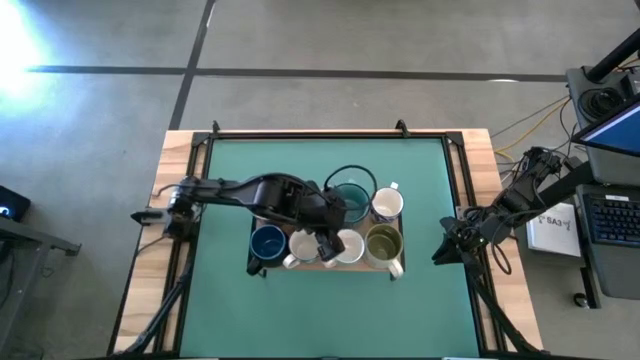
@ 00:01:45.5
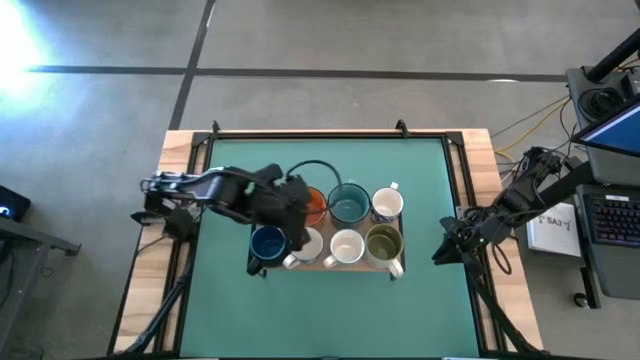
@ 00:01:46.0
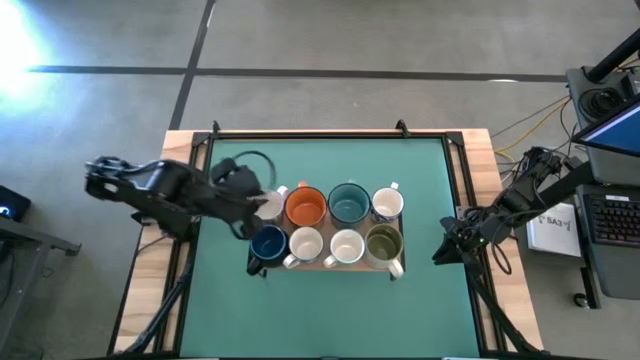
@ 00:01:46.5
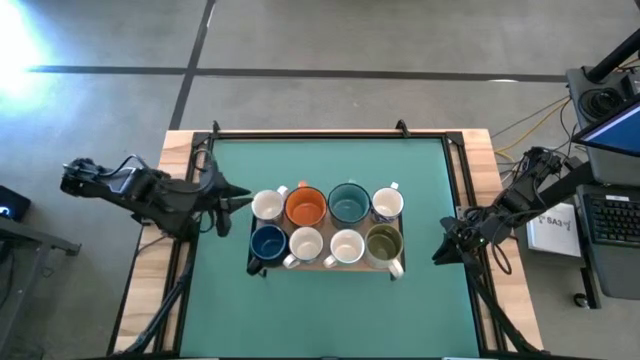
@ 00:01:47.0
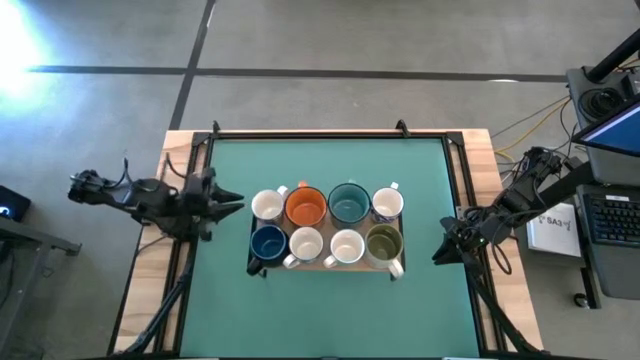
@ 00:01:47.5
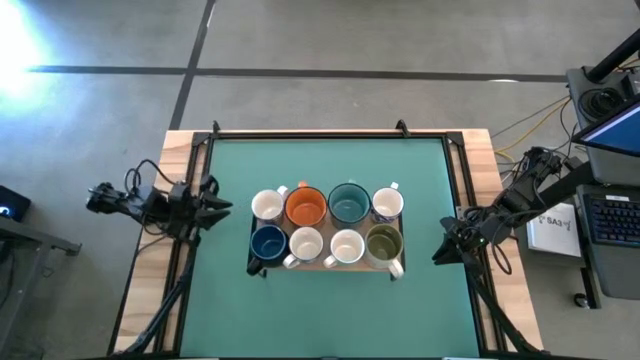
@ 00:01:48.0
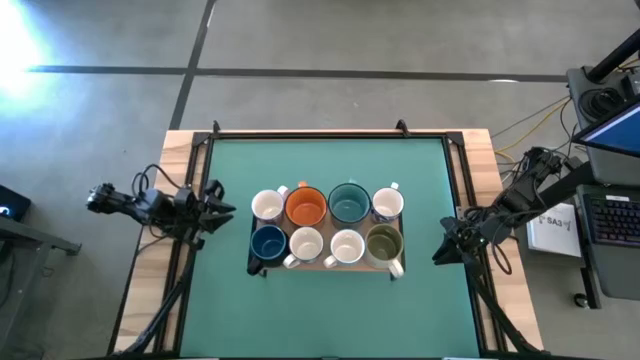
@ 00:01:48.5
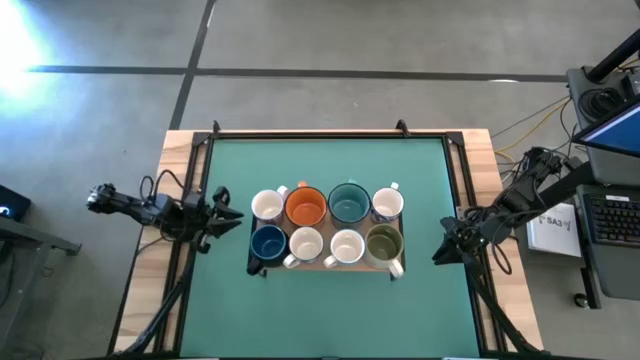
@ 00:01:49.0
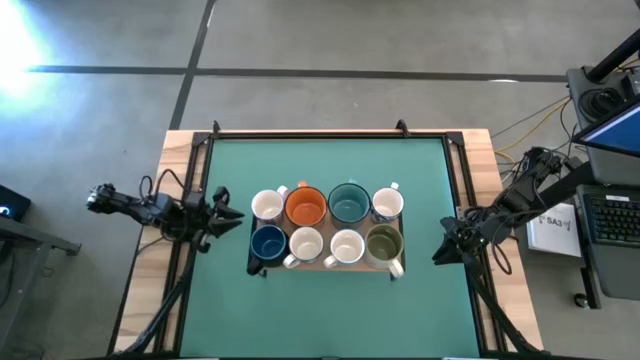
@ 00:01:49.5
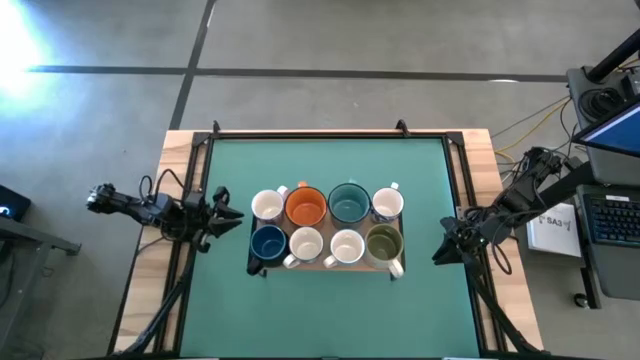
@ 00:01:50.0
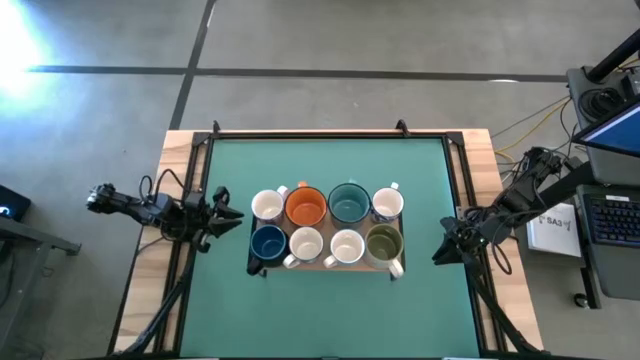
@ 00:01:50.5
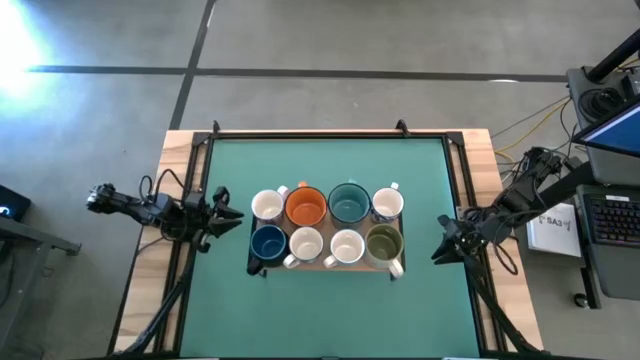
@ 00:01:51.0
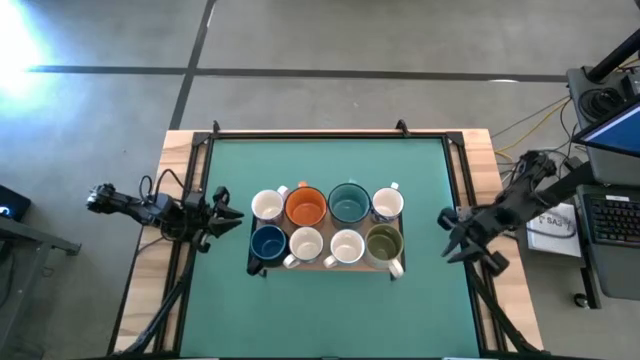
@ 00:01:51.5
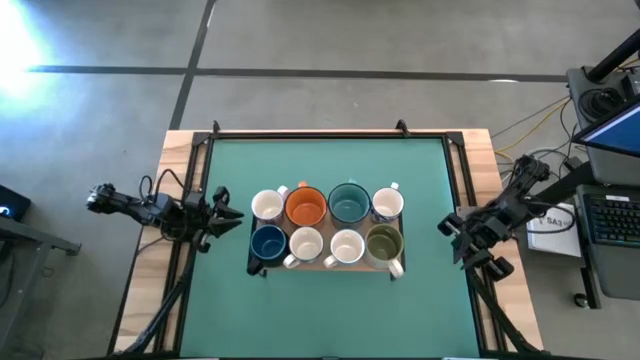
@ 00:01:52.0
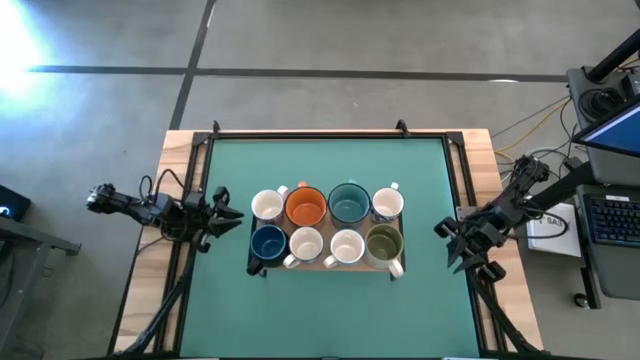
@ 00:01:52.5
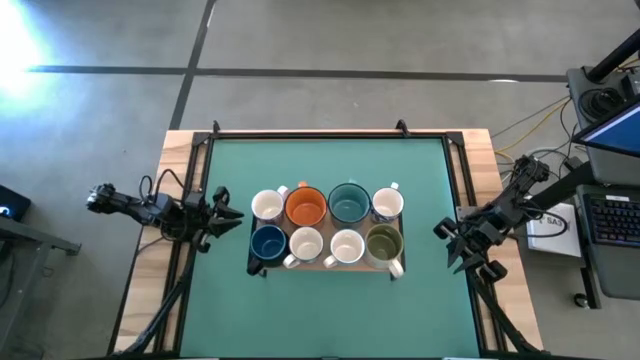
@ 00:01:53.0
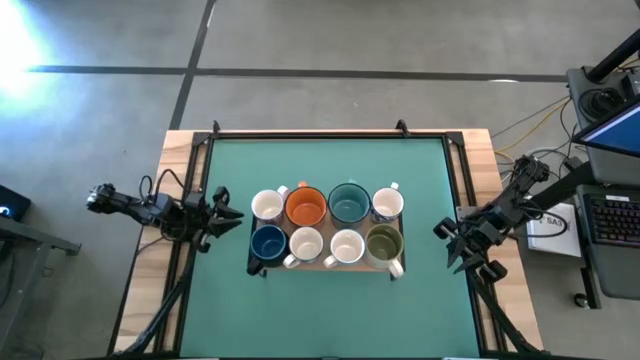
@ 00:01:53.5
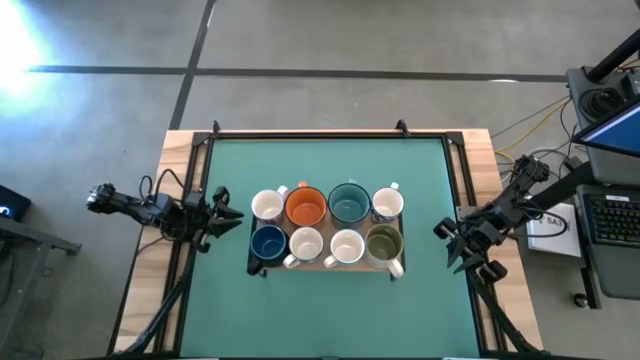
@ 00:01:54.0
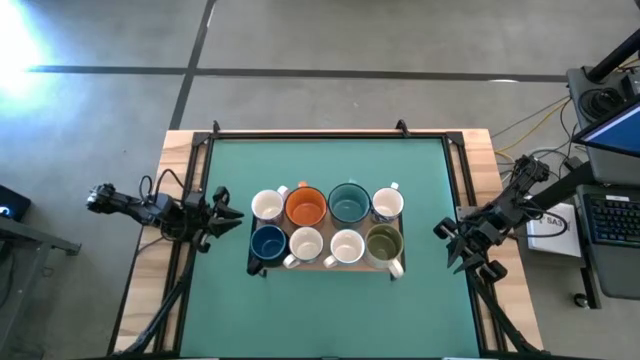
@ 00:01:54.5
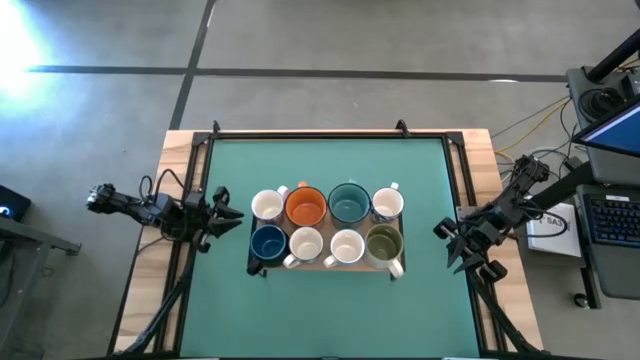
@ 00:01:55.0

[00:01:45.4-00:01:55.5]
Task: Place coffee mugs
Return to Home Position

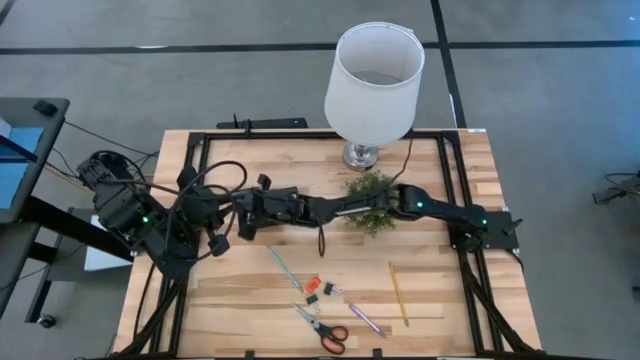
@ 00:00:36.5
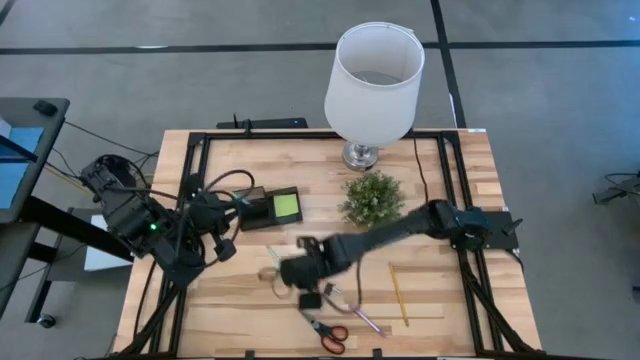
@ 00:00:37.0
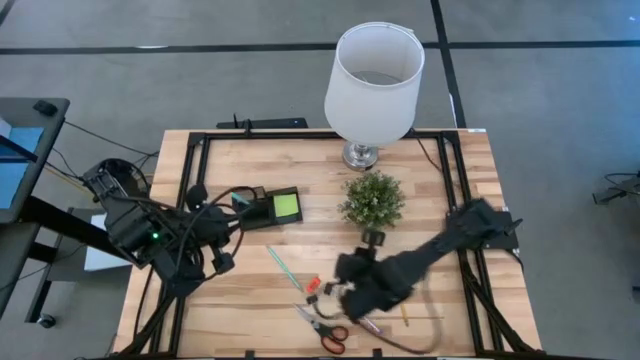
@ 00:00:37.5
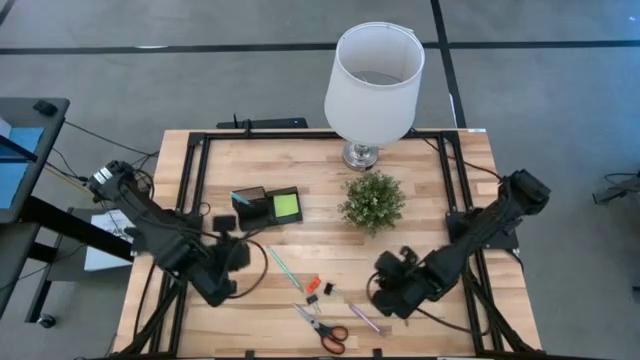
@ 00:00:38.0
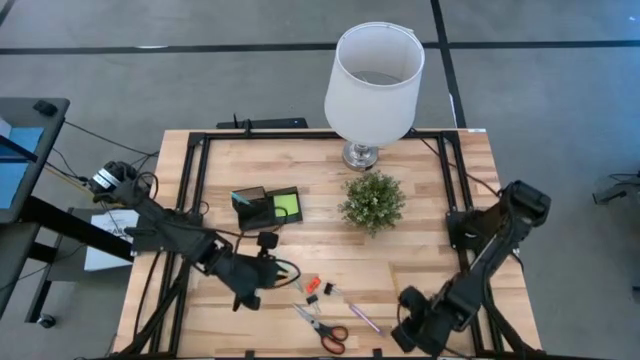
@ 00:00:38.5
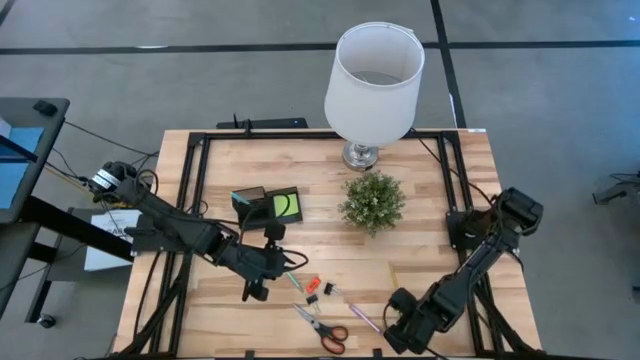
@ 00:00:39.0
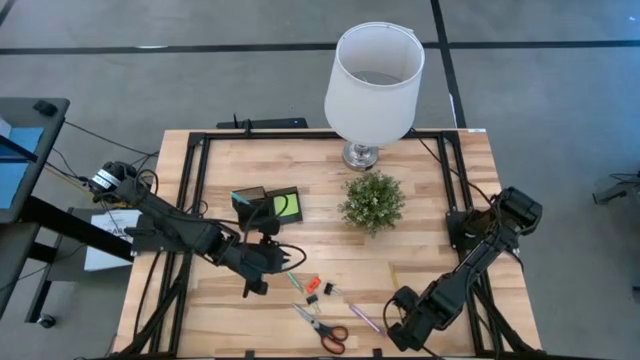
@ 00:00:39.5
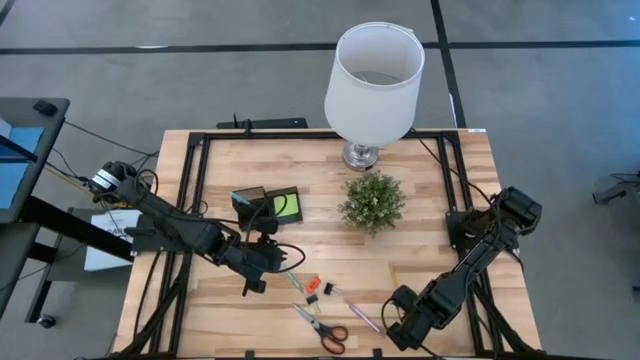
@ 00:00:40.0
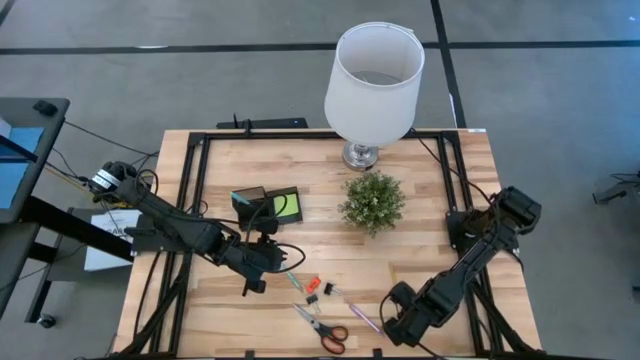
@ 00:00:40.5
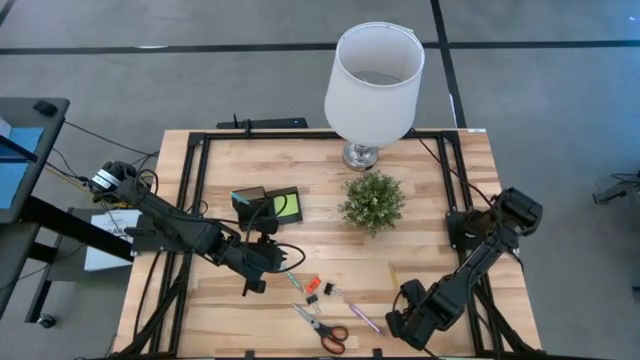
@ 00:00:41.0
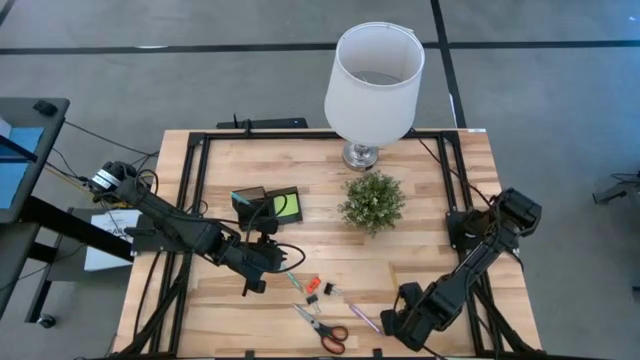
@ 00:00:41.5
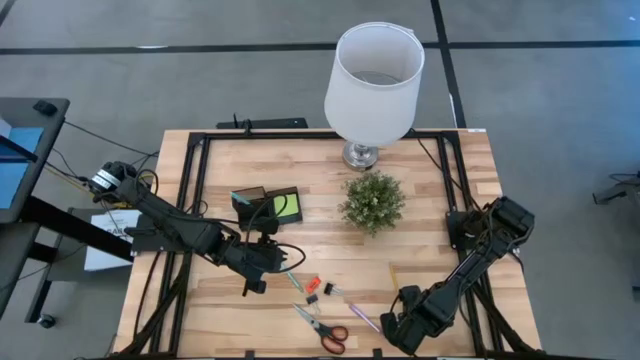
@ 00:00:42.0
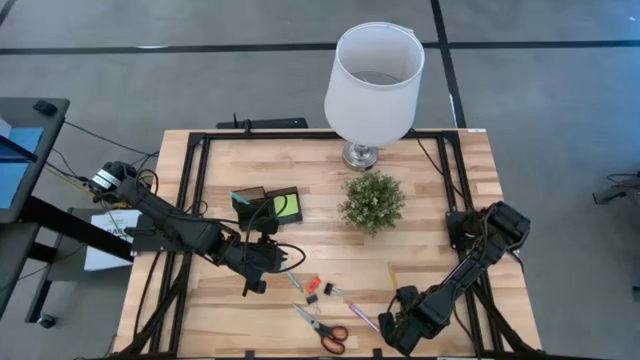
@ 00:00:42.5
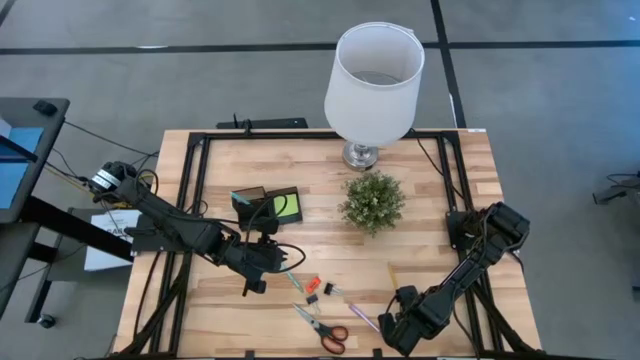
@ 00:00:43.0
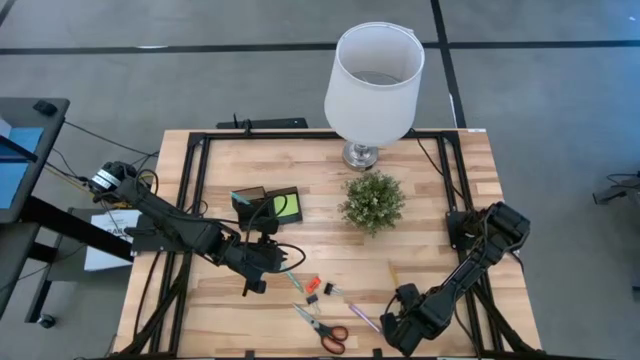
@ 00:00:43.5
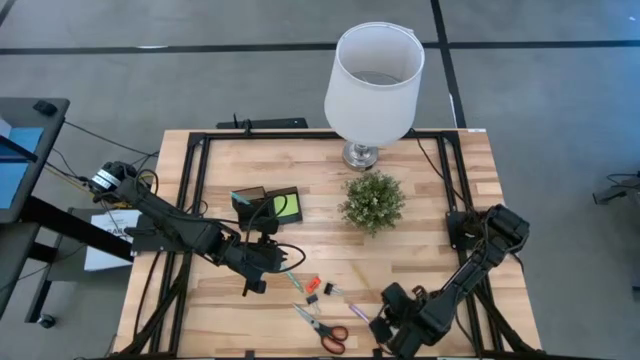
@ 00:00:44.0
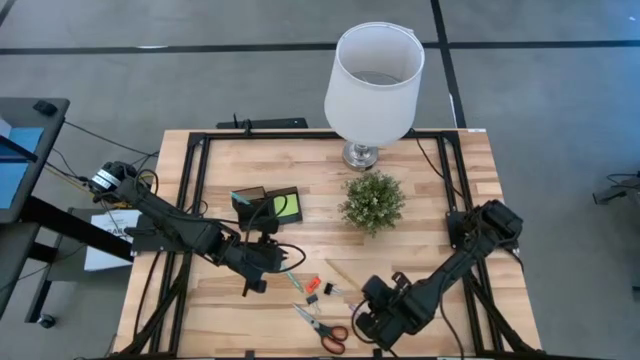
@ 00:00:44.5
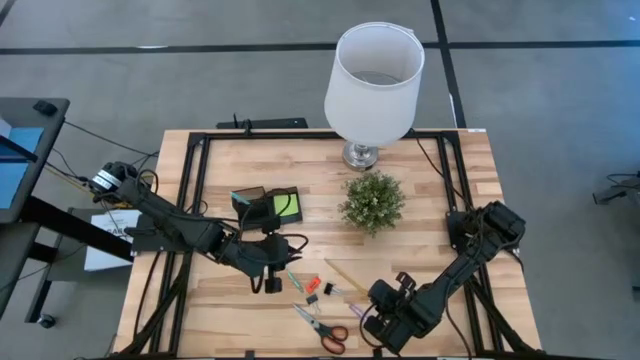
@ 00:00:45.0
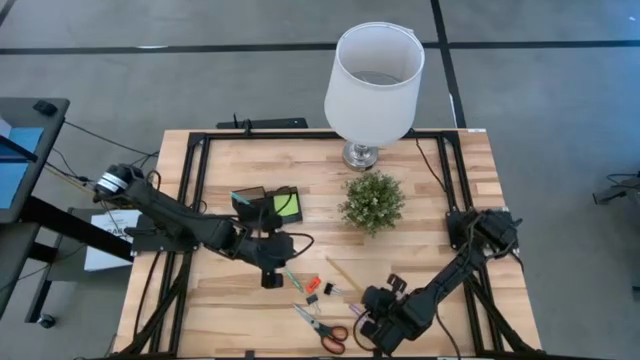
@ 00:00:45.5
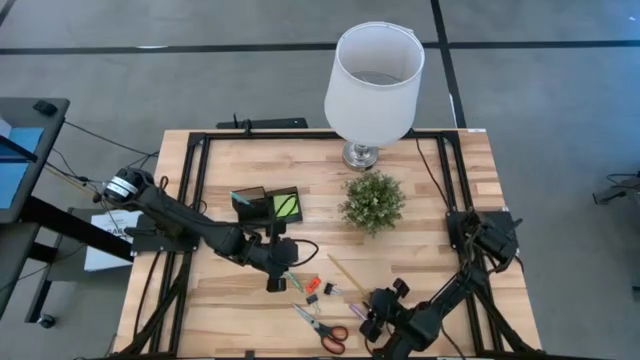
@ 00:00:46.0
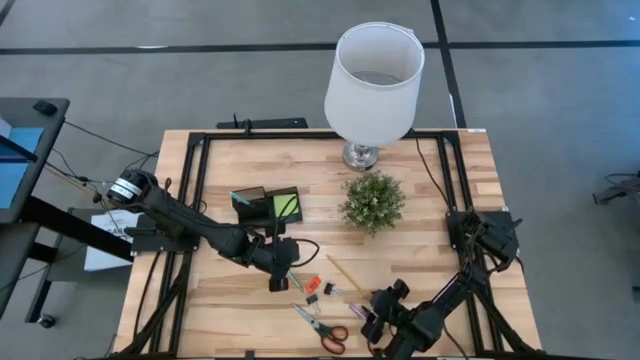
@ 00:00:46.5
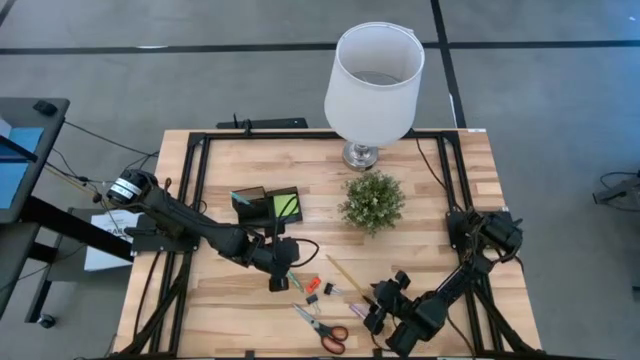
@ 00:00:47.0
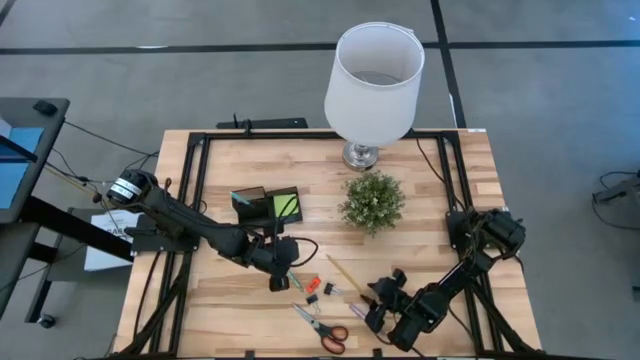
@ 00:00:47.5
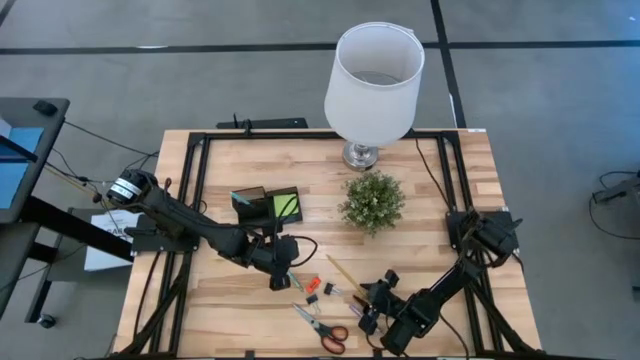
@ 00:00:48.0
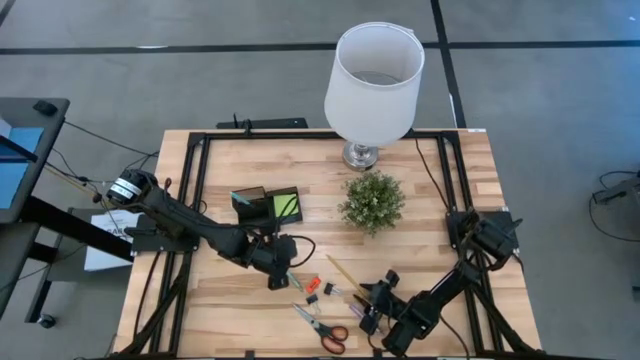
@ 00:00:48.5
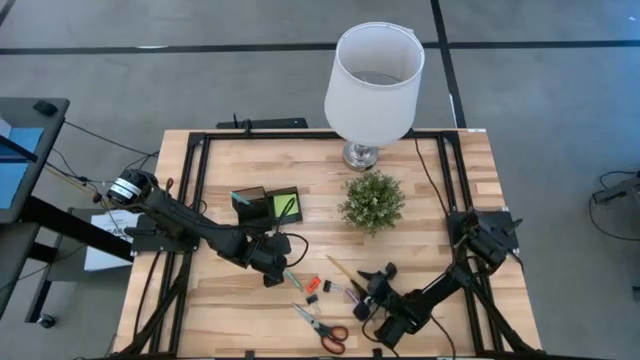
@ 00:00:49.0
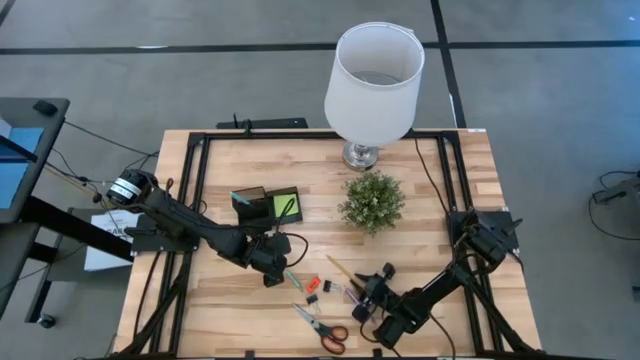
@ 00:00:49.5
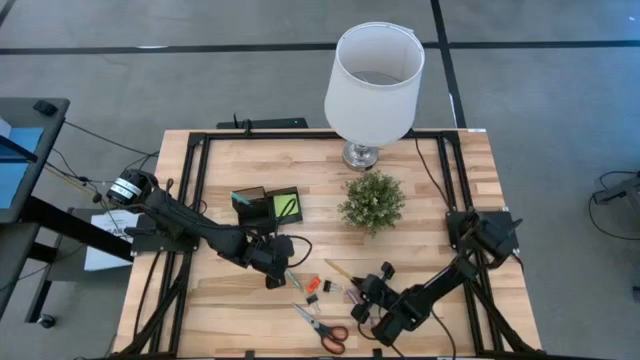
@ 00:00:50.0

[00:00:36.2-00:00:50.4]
Task: Pick and place office supplies into organizer
Put the yellow pencil into the black desk organizer
